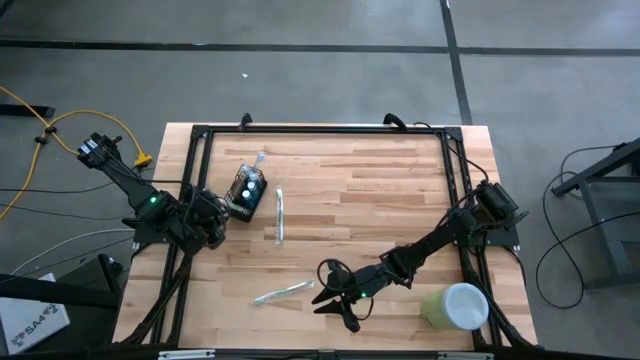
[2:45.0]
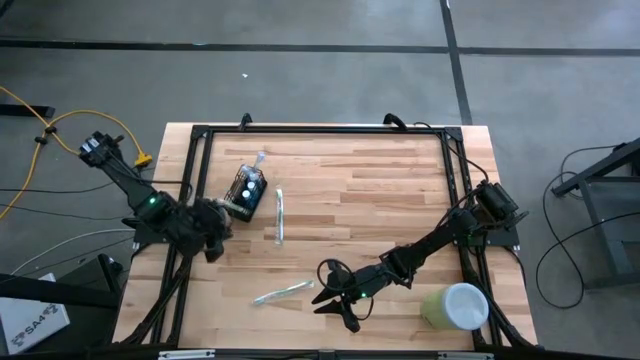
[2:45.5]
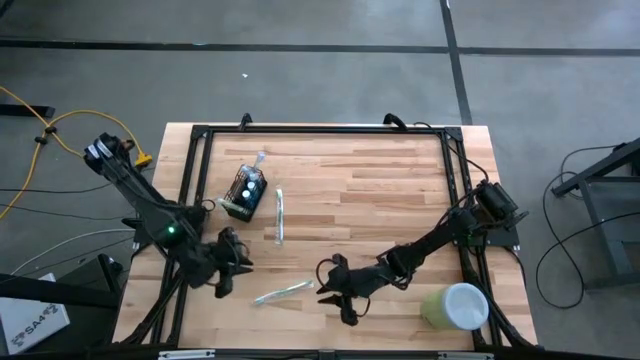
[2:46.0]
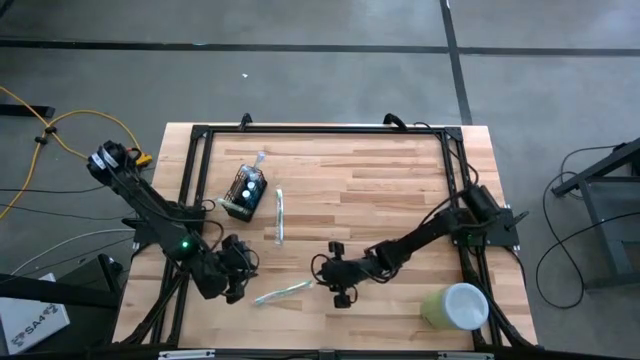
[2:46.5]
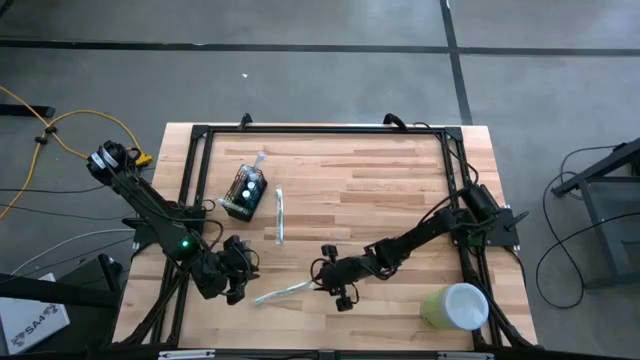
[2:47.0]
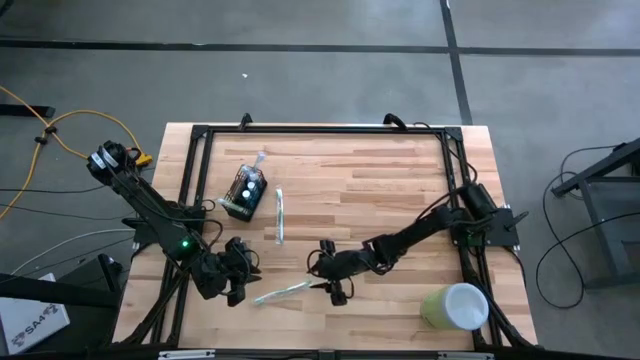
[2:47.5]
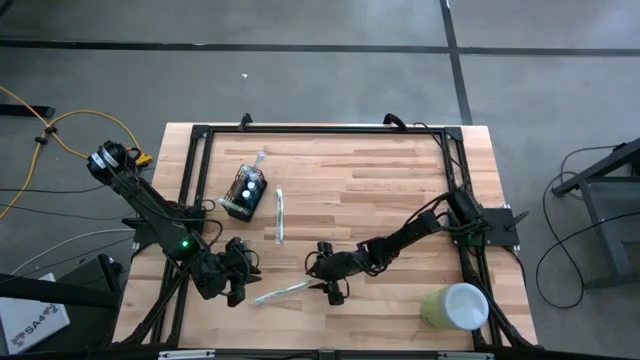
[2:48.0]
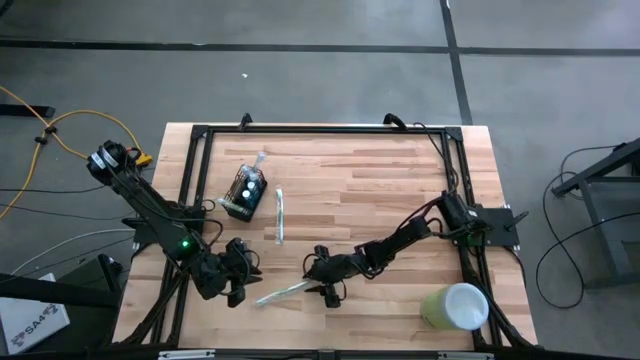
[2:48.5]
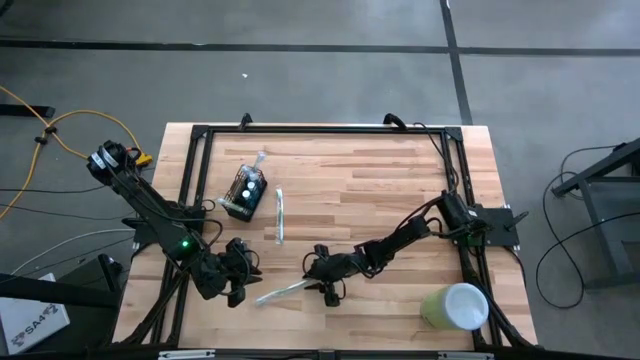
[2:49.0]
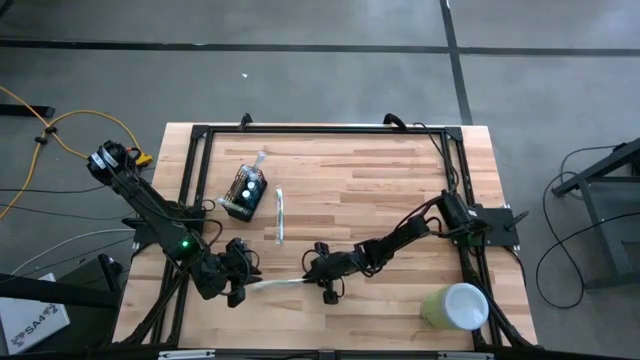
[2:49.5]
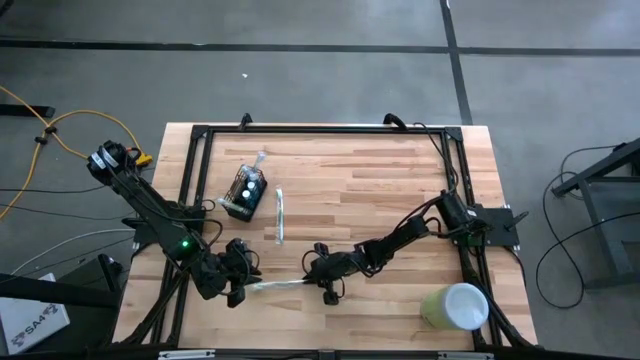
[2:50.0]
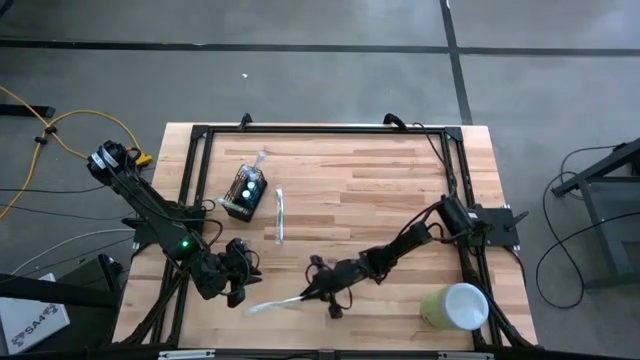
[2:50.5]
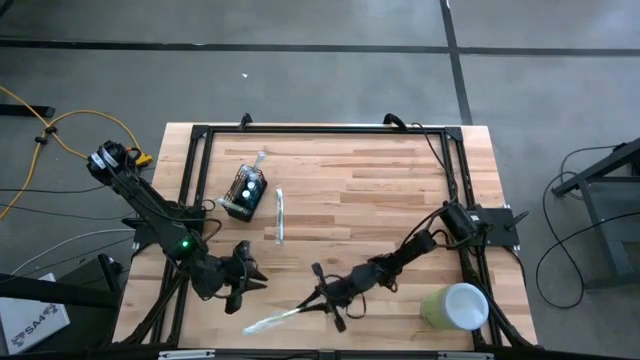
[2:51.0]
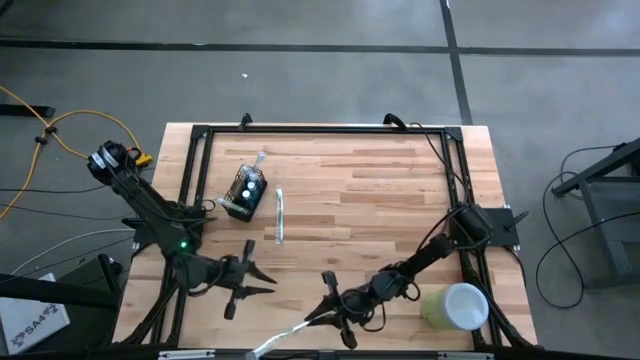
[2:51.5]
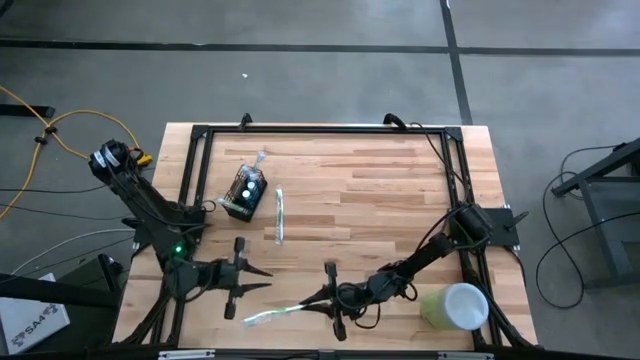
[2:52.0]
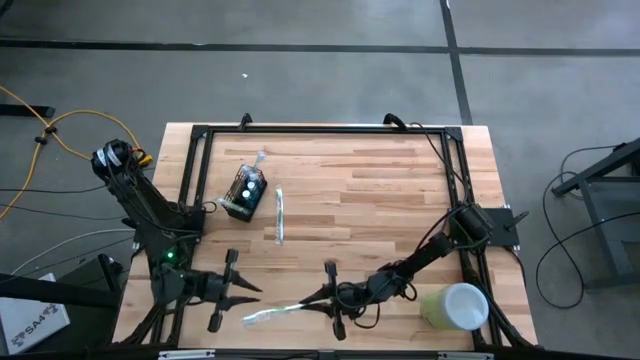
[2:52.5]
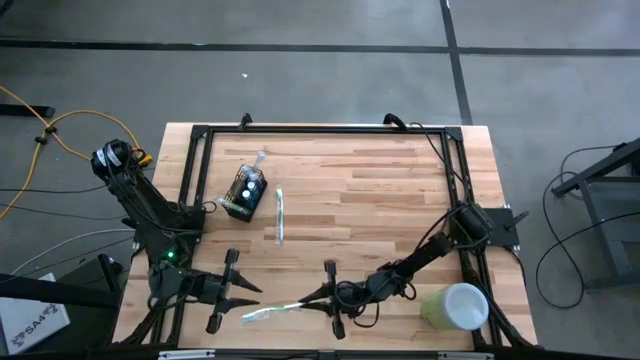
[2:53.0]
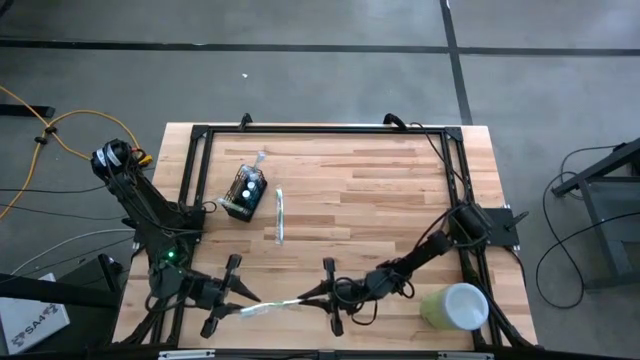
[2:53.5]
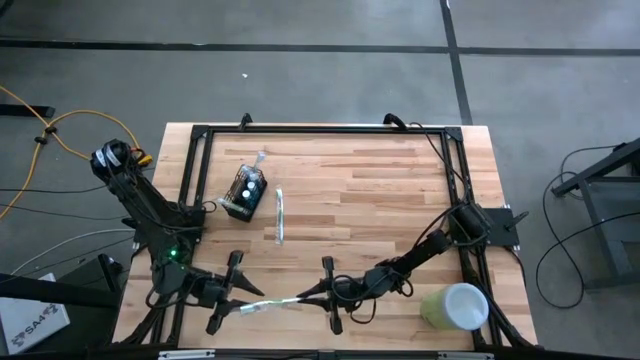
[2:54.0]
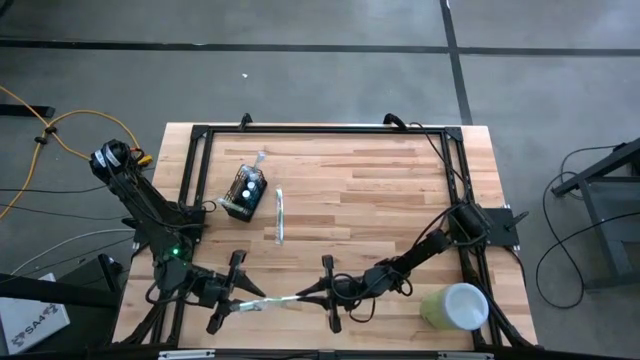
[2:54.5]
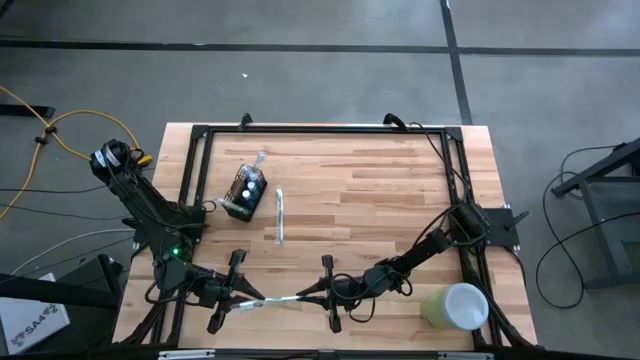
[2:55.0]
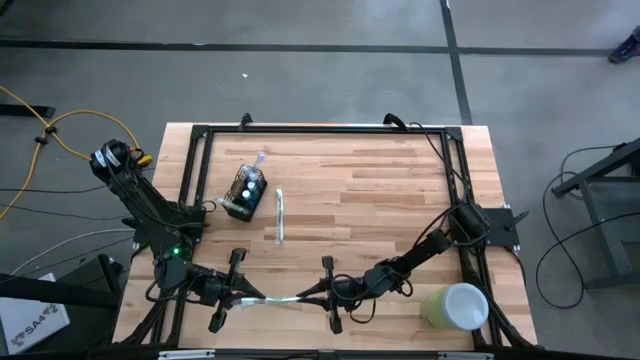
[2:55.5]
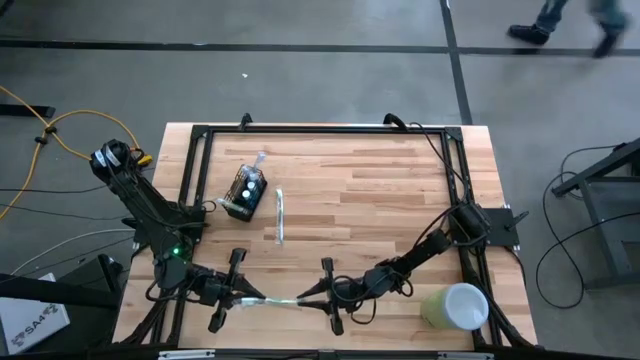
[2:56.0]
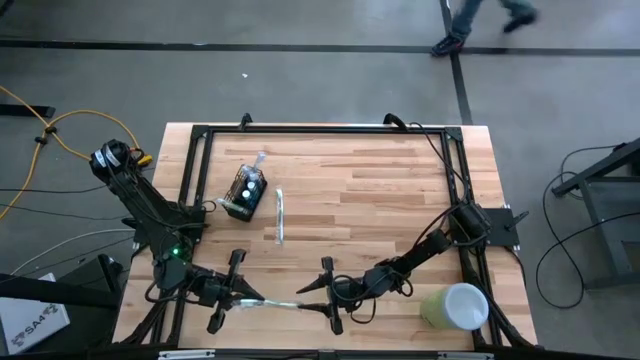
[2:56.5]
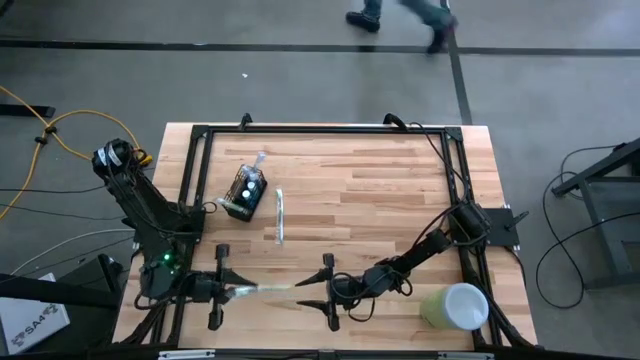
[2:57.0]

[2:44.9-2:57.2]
Task: Pick & Place toothbrushing station
Put the bottom green toothbrush into the black wire organizer

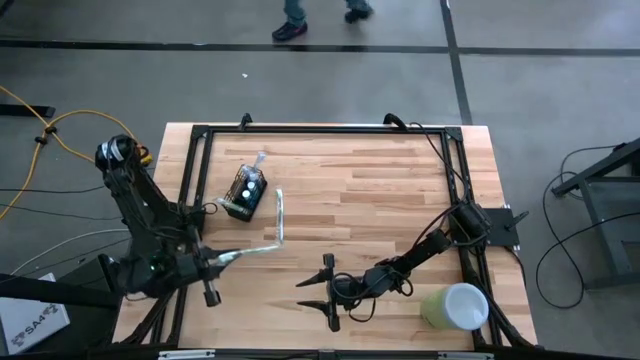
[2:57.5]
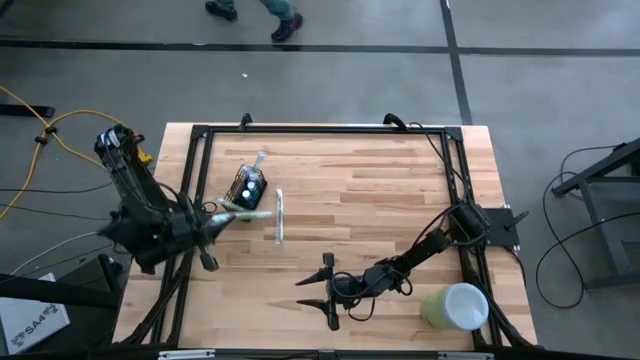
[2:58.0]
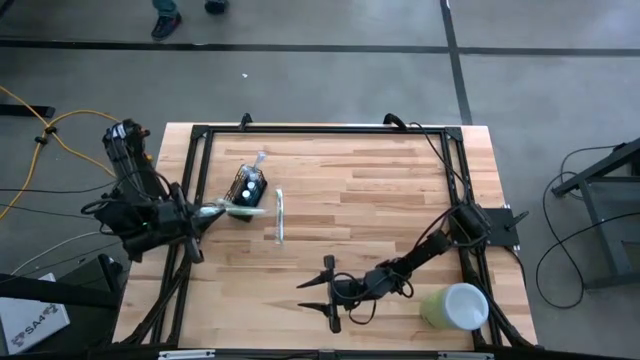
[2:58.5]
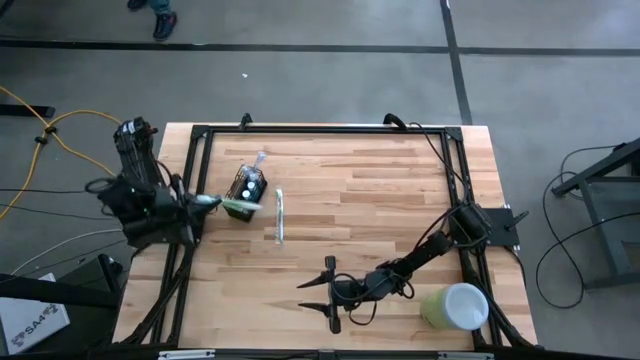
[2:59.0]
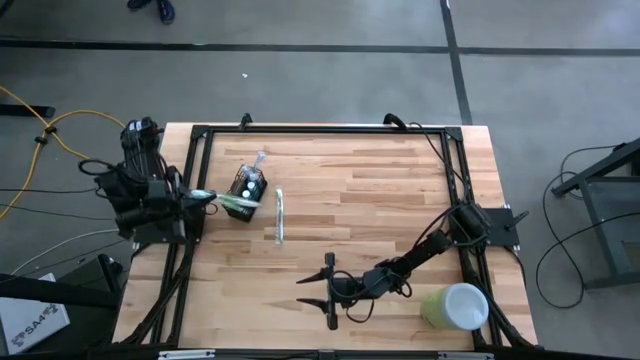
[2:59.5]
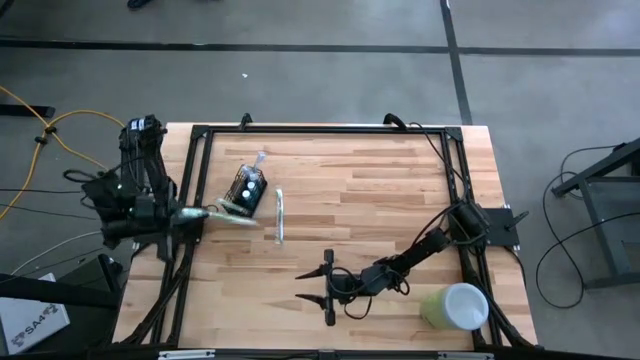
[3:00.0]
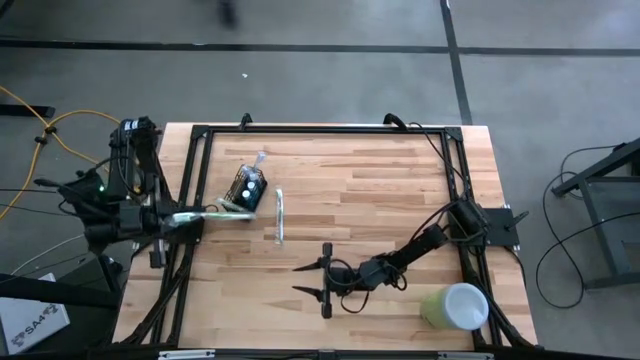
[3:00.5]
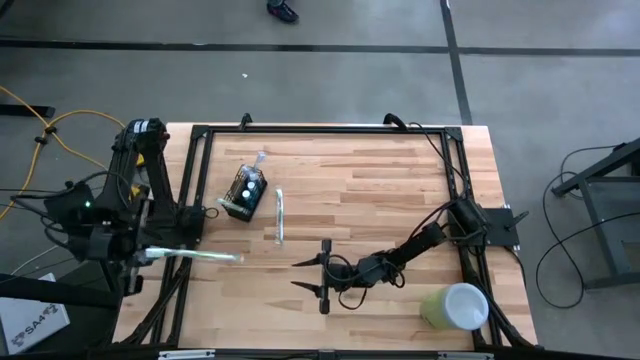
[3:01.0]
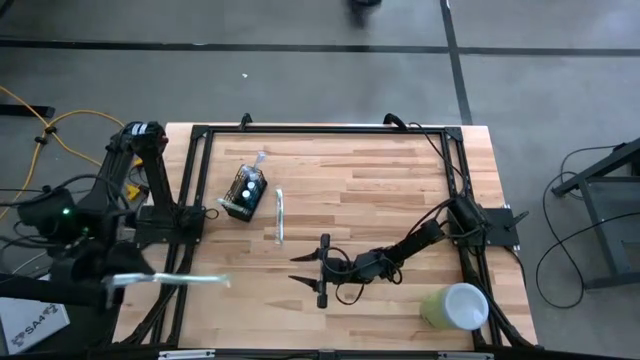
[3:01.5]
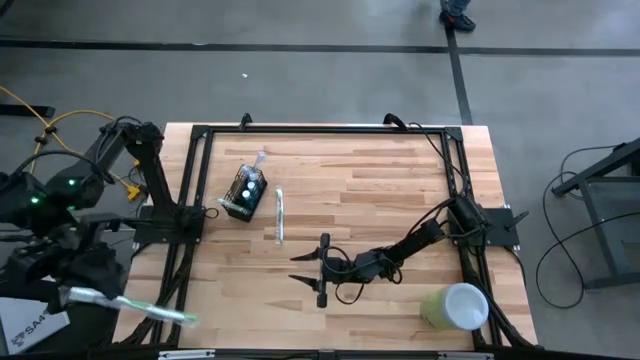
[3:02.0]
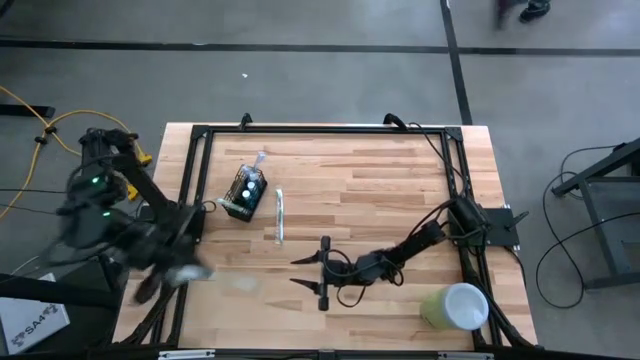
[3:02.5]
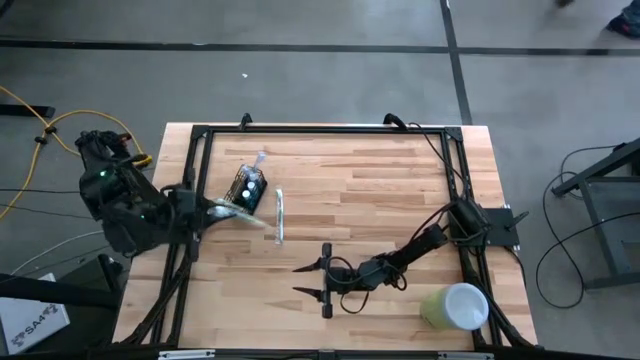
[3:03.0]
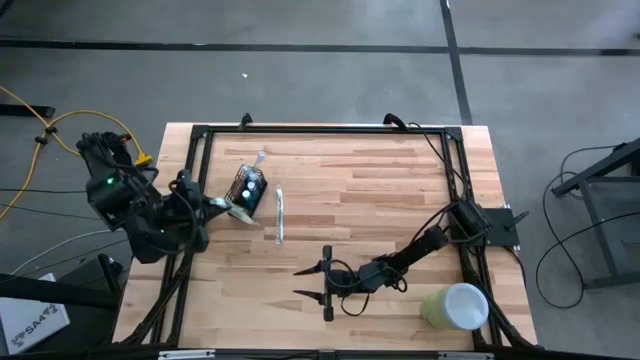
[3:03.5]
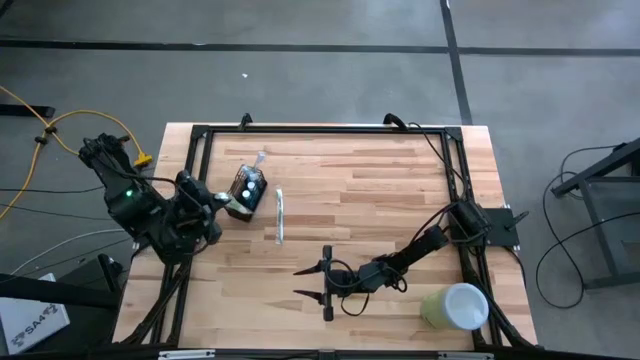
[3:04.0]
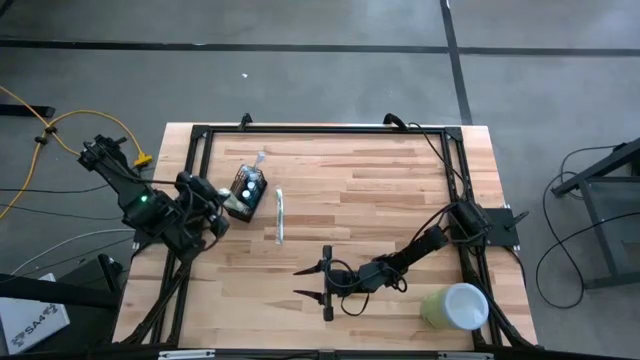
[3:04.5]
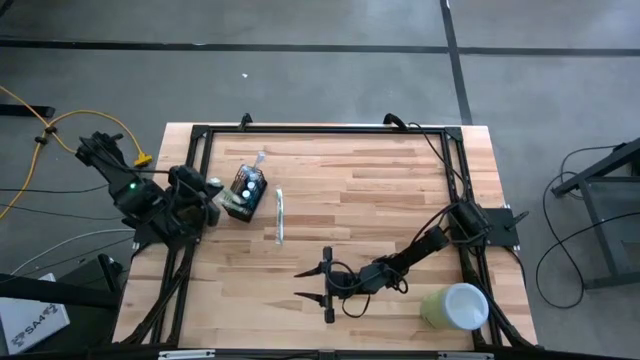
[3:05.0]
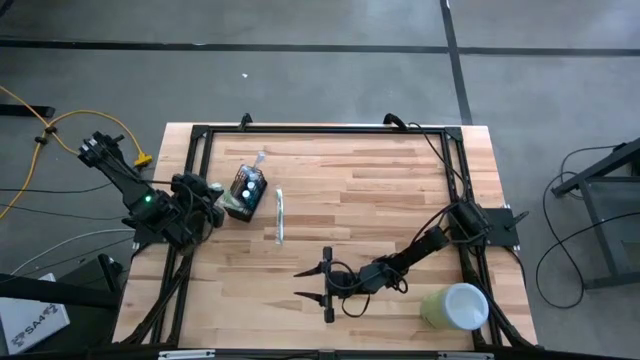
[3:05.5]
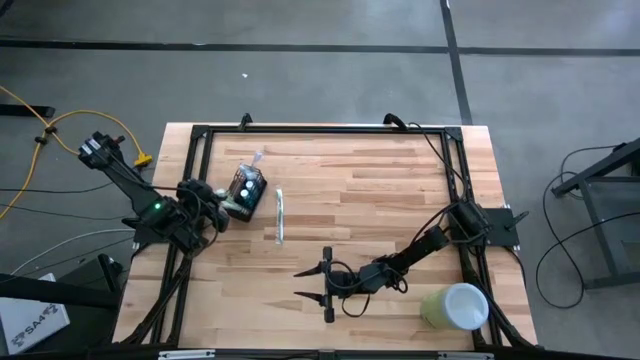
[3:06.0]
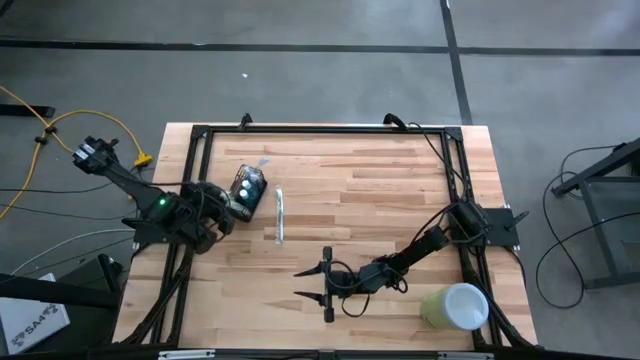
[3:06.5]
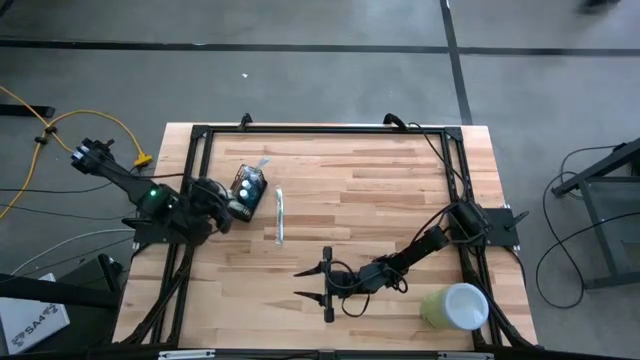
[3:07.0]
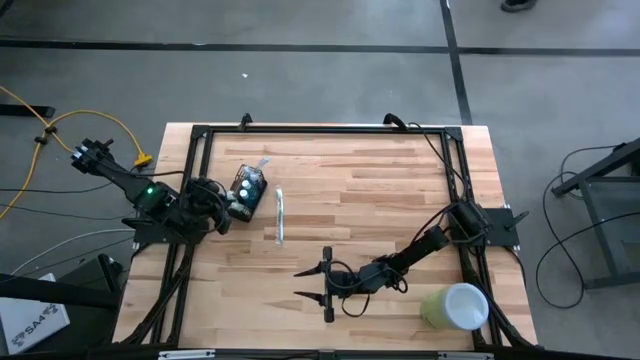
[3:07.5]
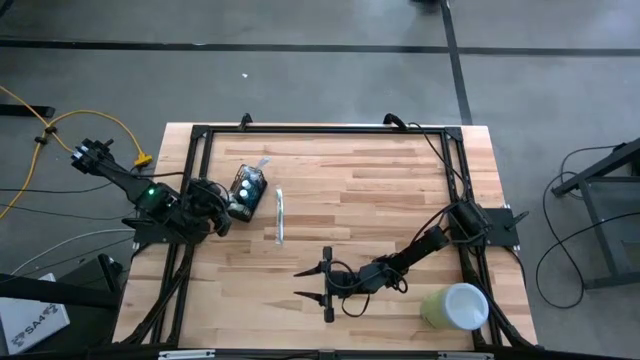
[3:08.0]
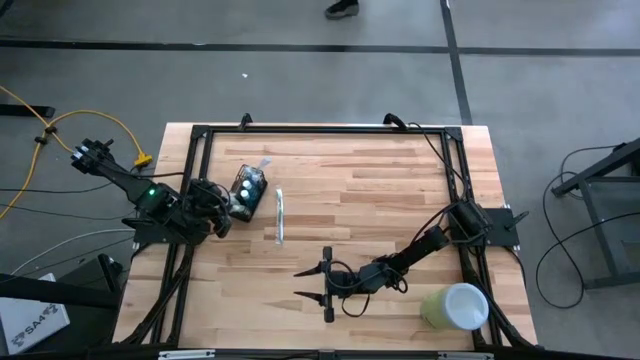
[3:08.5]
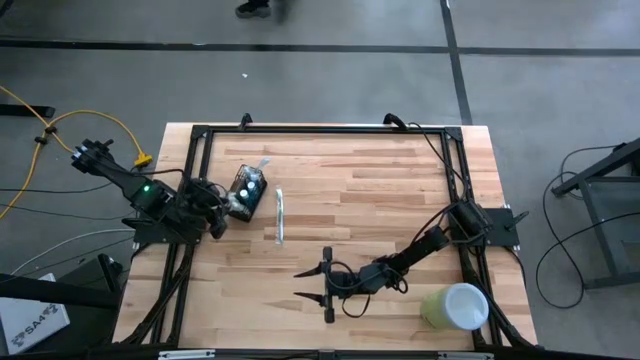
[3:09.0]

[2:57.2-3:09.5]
Put the bottom green toothbrush into the black wire organizer
